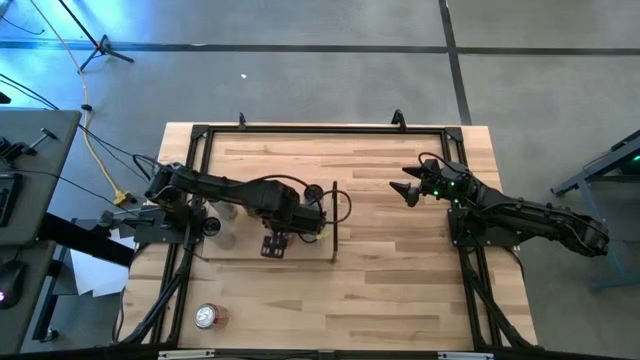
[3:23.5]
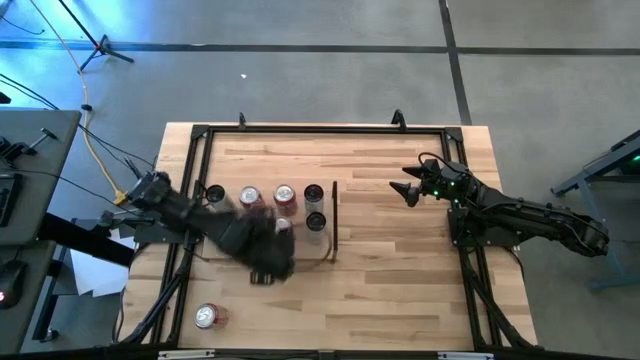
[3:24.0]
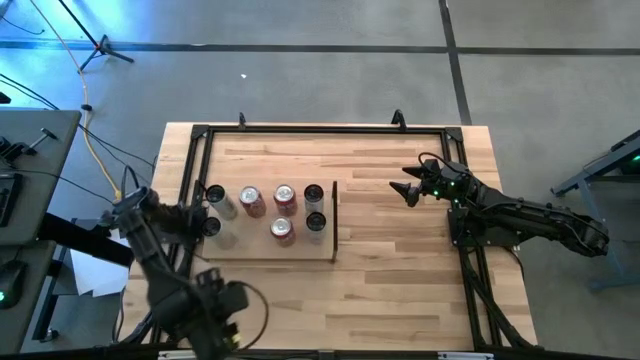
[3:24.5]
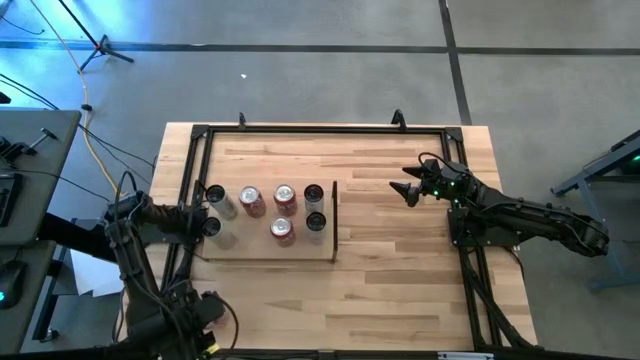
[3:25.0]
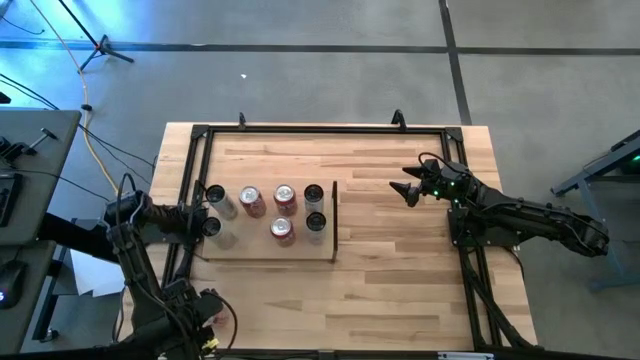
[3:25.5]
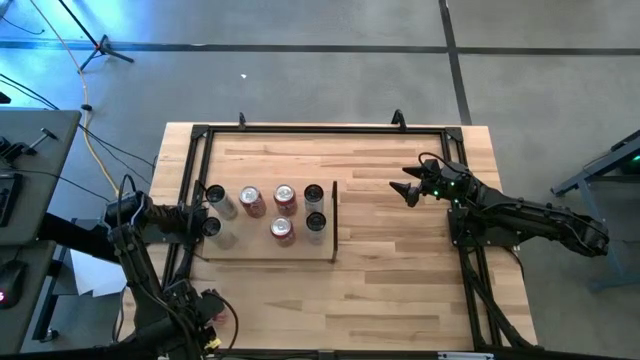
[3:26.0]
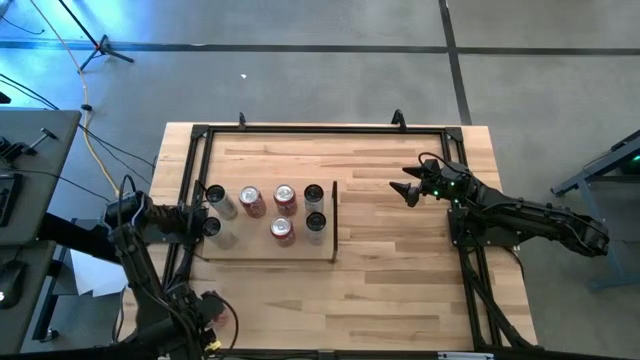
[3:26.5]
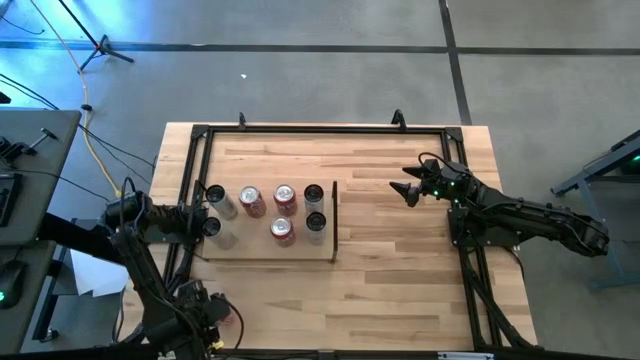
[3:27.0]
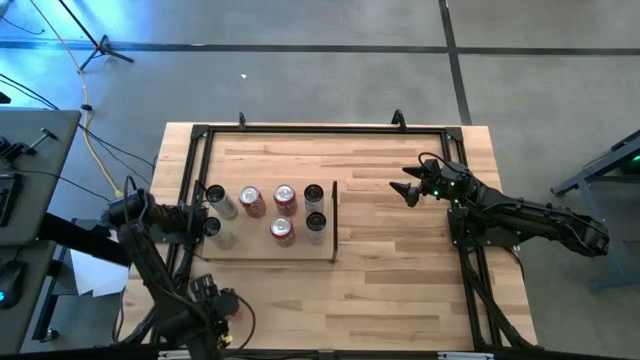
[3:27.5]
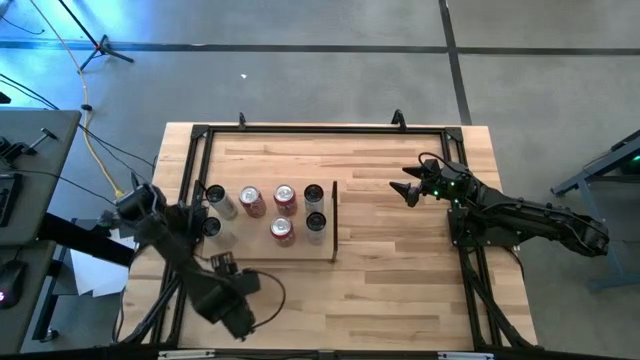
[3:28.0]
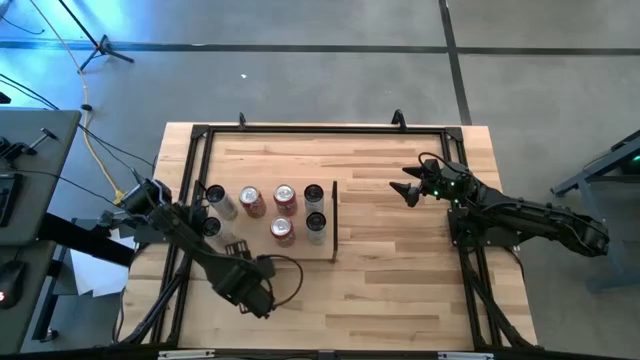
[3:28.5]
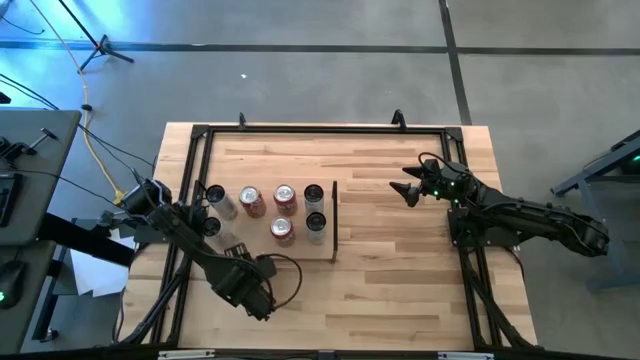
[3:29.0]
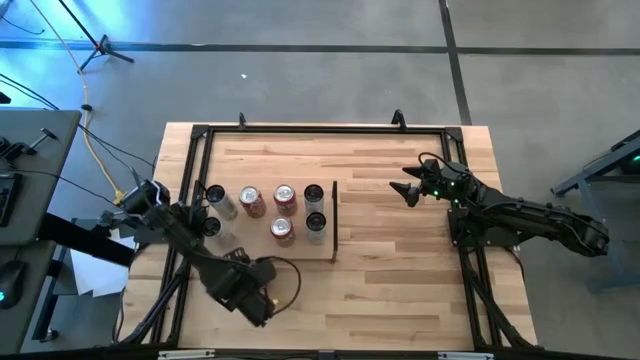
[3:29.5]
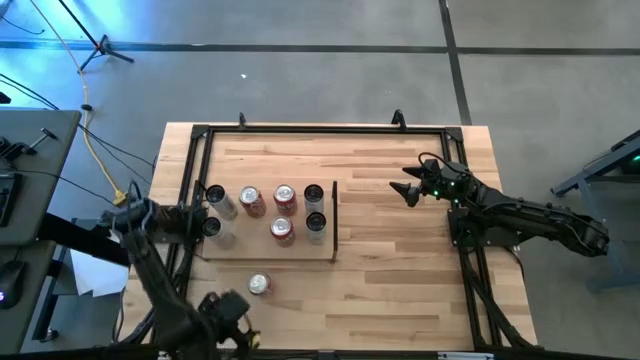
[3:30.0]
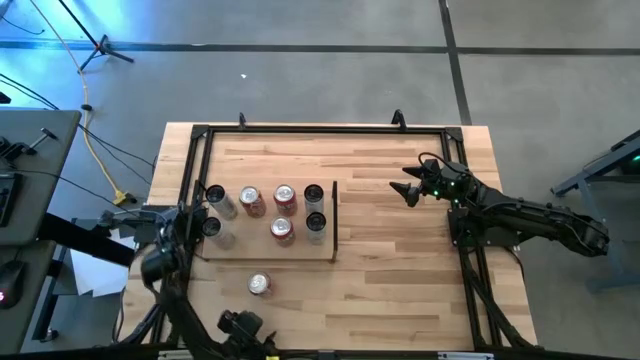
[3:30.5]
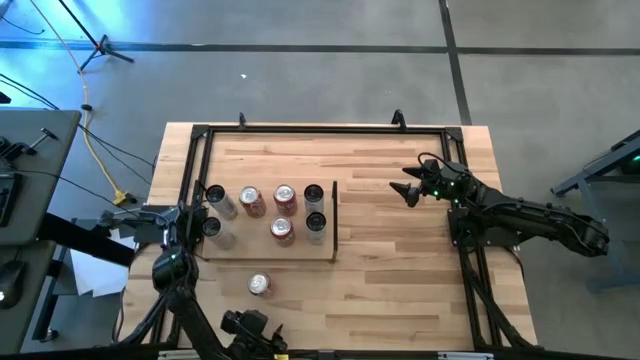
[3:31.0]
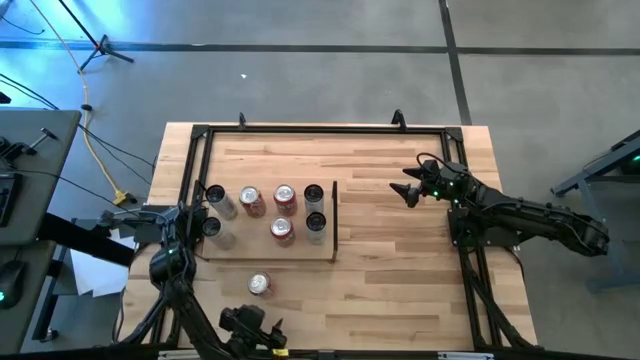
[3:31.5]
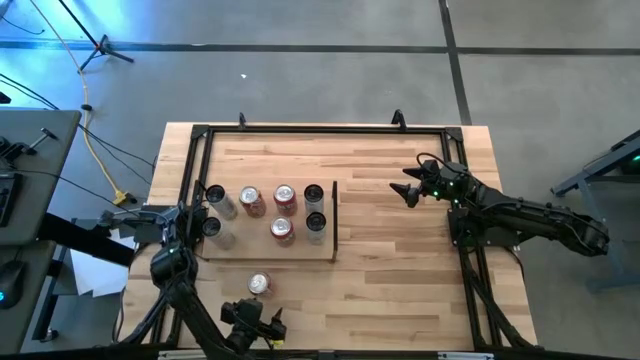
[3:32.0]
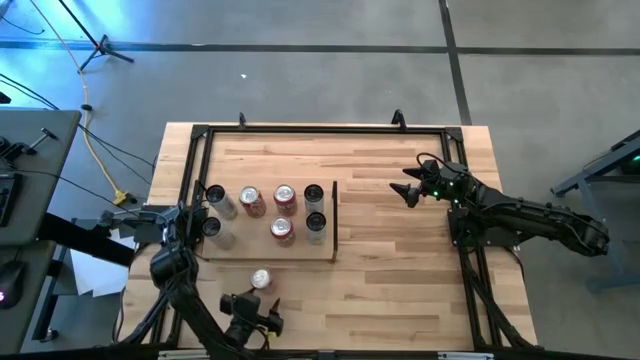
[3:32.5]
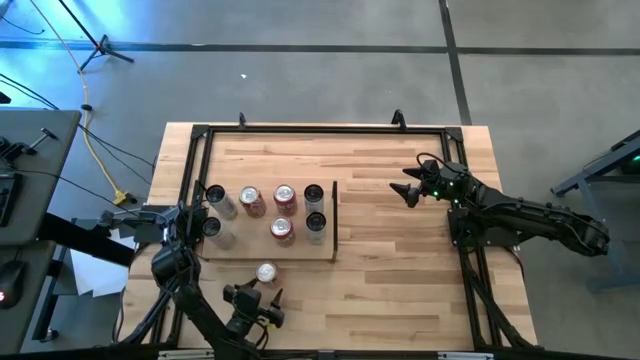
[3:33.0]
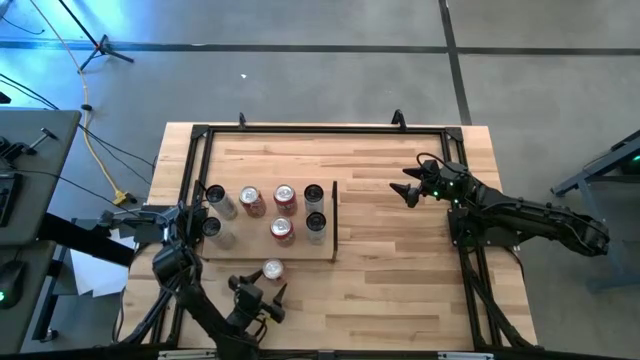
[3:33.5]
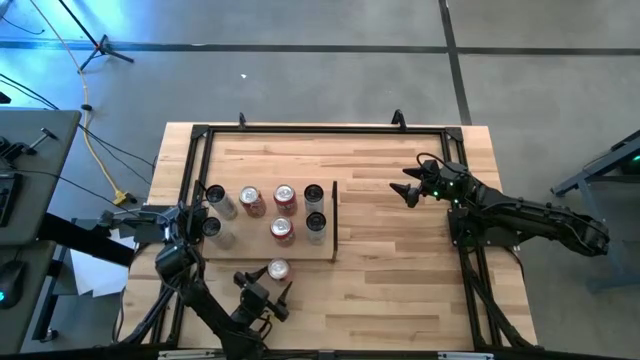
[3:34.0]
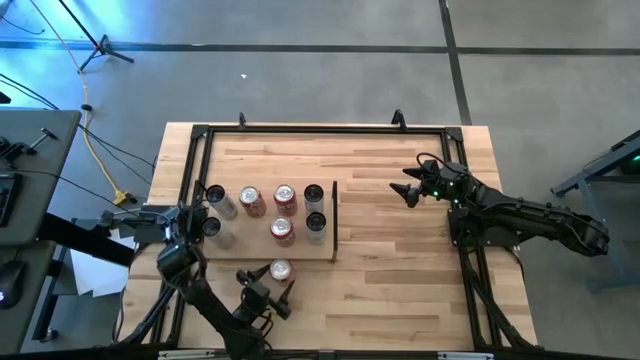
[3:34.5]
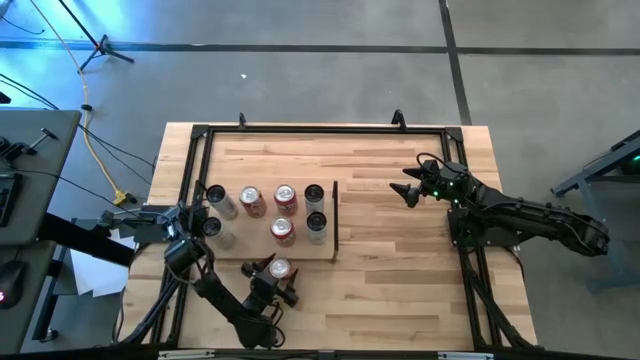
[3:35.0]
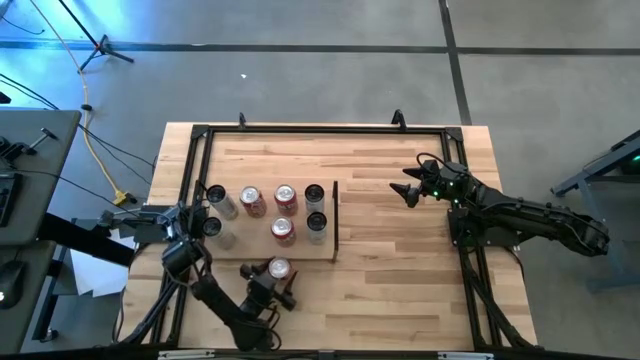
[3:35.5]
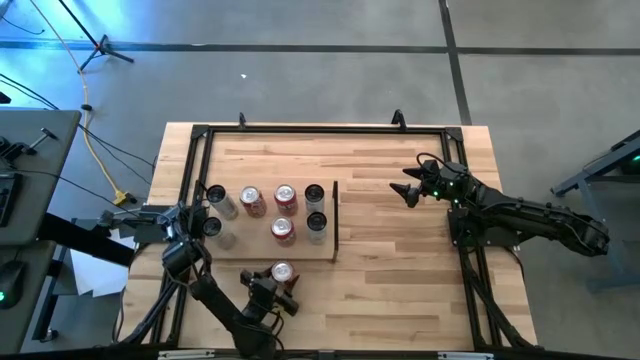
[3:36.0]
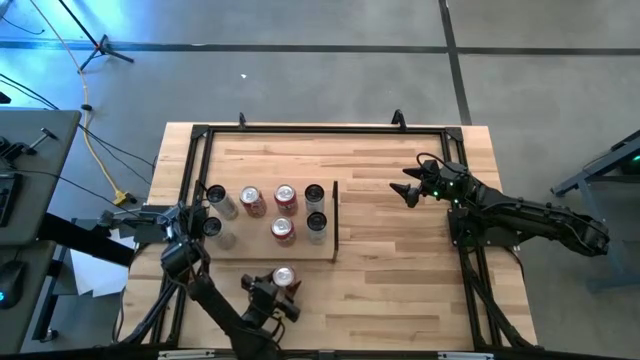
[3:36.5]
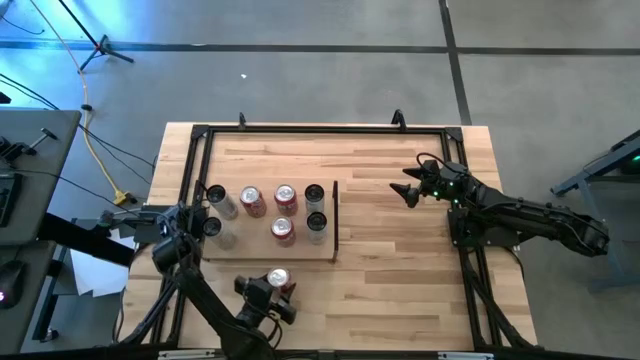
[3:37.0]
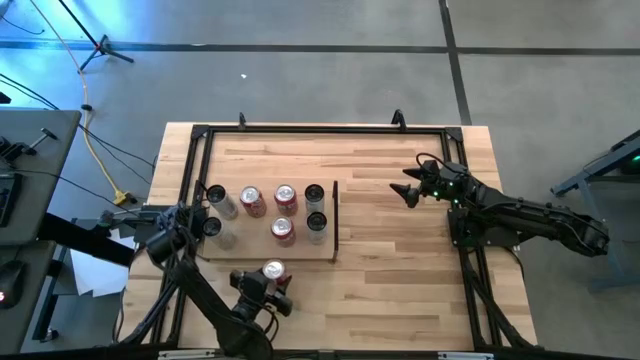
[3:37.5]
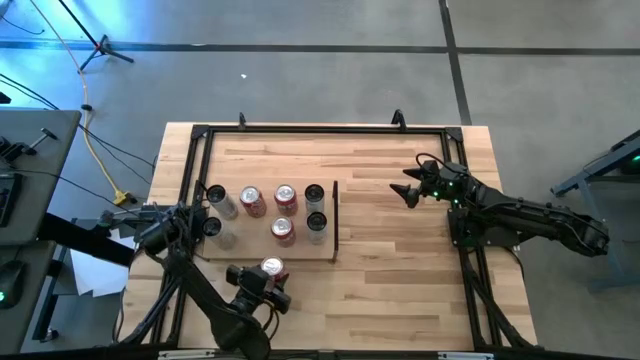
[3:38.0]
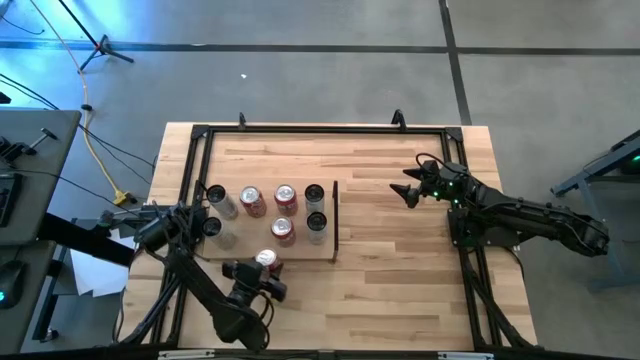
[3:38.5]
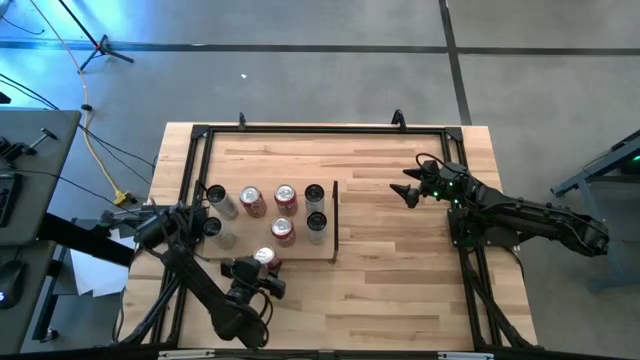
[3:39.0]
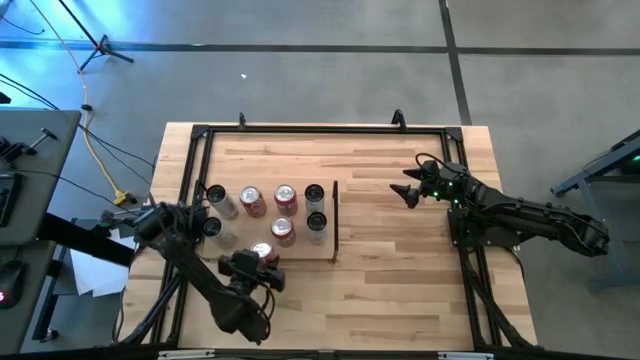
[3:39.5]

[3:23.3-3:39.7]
Task: Place canned beverage on shelf
Put the right red white can aligned with the other red white soda can on the shelf

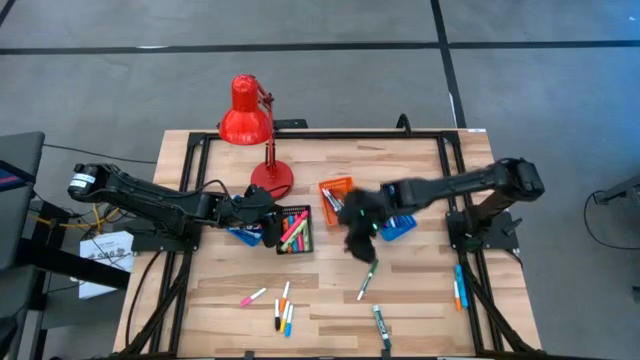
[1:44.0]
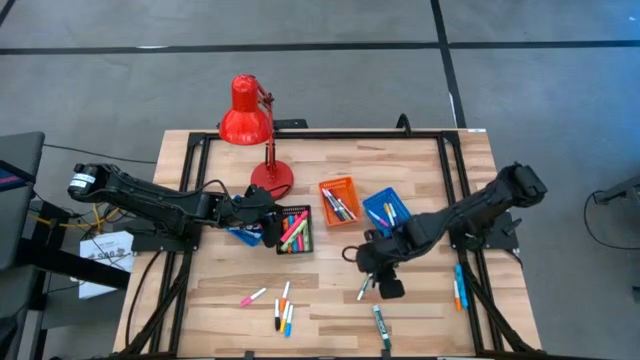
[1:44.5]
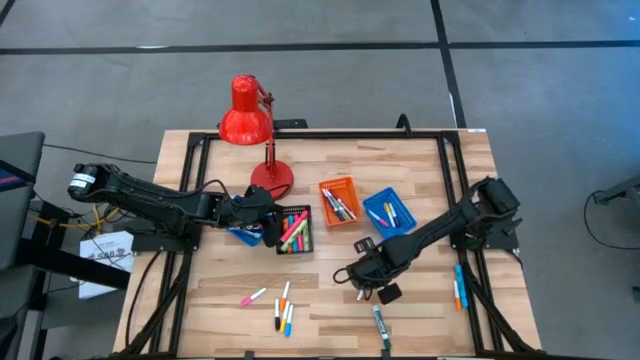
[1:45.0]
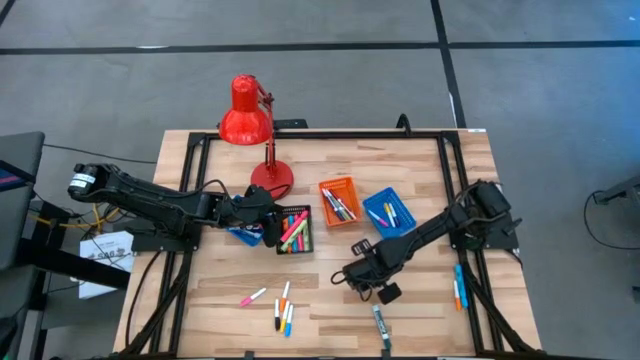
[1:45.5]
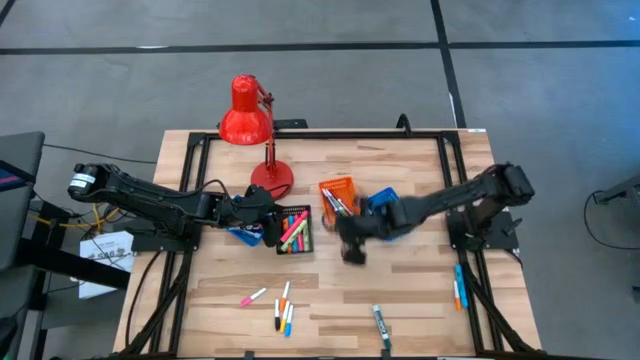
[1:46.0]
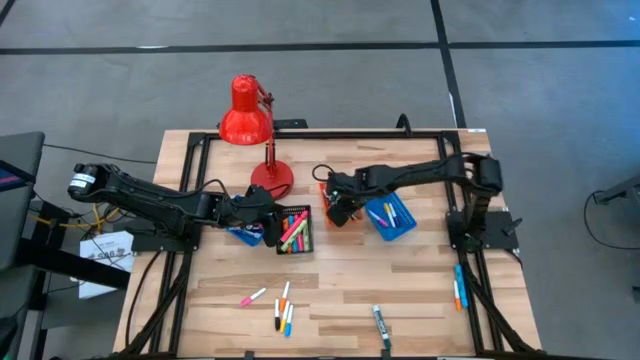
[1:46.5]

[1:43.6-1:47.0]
Task: Pick & Place Markers
Put the small green marker pen into the orange basket
